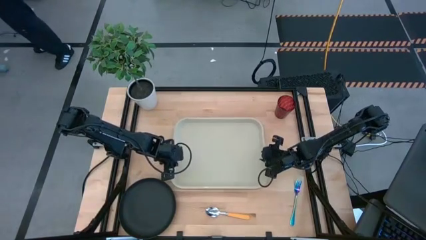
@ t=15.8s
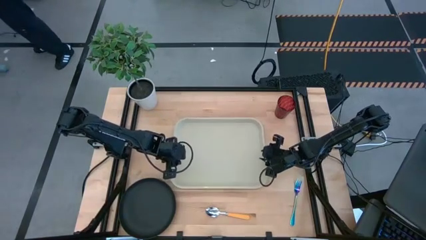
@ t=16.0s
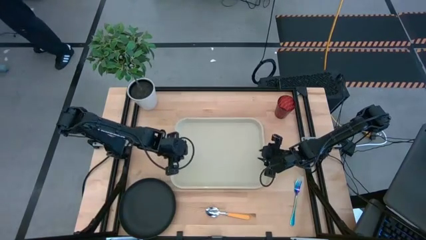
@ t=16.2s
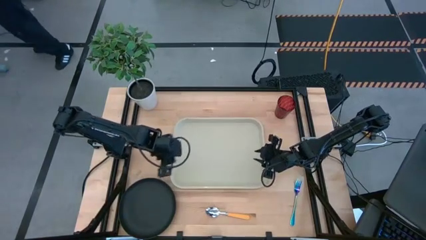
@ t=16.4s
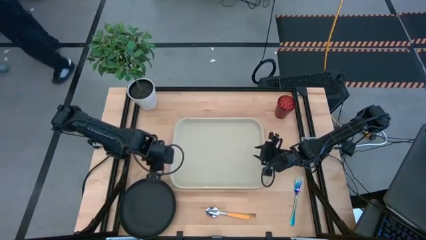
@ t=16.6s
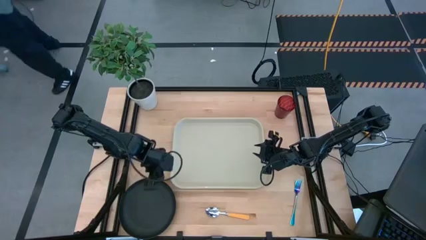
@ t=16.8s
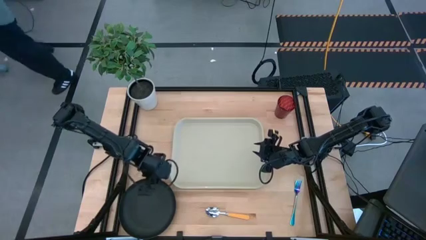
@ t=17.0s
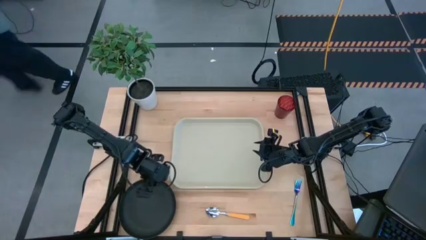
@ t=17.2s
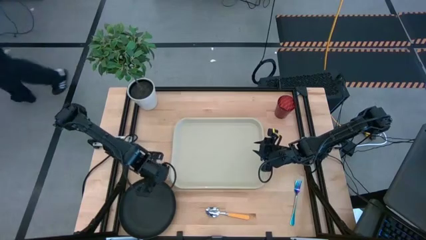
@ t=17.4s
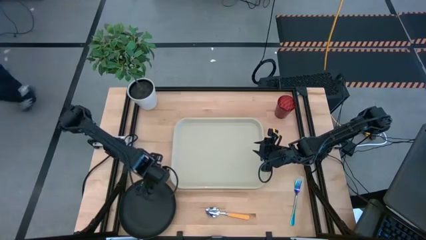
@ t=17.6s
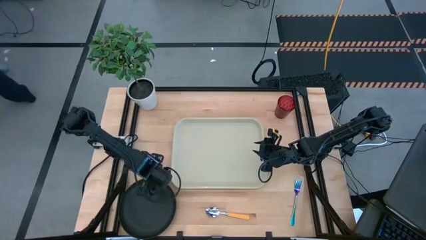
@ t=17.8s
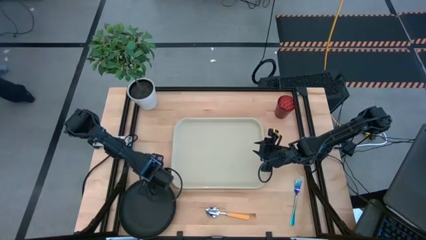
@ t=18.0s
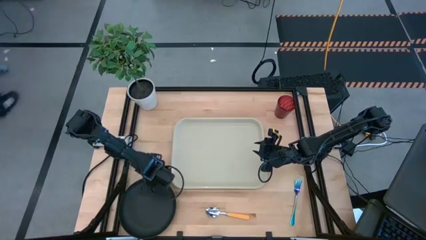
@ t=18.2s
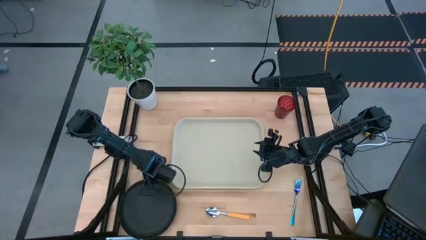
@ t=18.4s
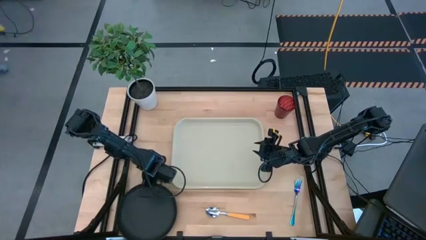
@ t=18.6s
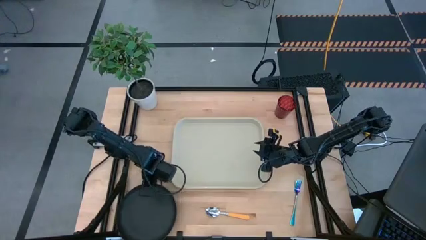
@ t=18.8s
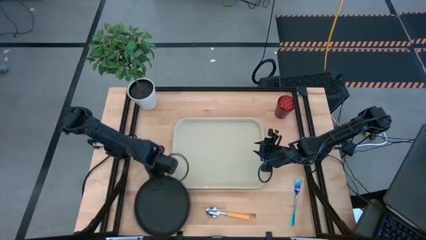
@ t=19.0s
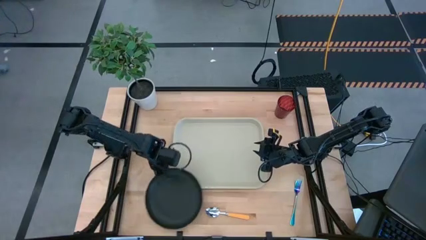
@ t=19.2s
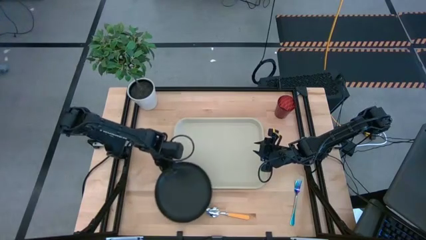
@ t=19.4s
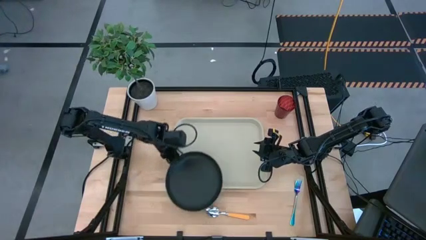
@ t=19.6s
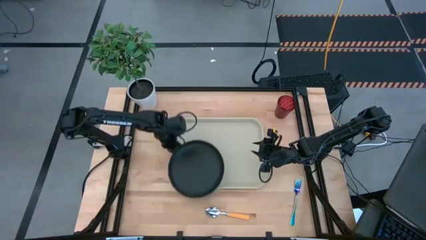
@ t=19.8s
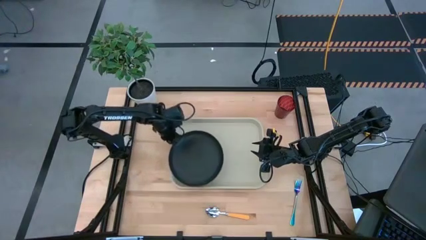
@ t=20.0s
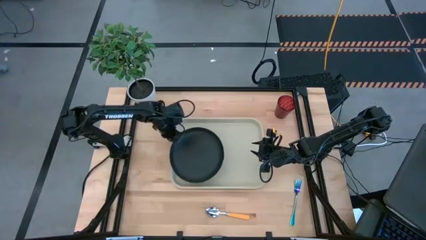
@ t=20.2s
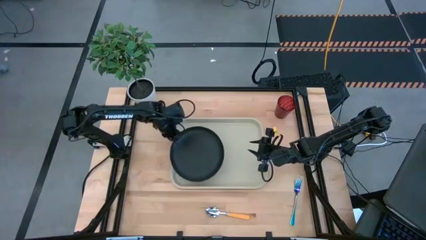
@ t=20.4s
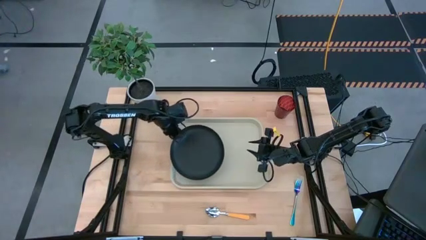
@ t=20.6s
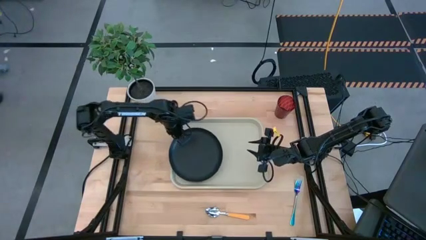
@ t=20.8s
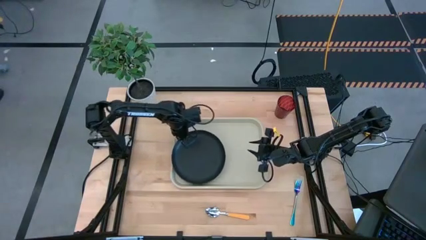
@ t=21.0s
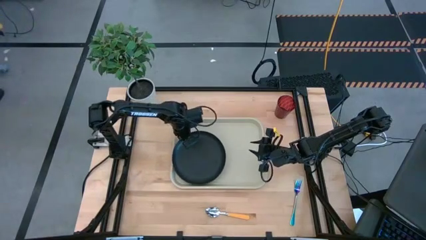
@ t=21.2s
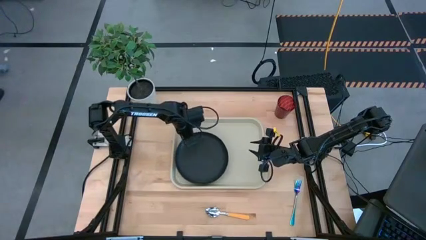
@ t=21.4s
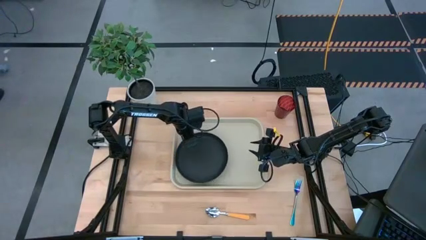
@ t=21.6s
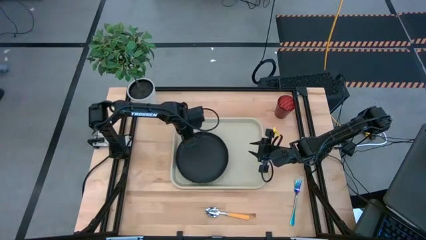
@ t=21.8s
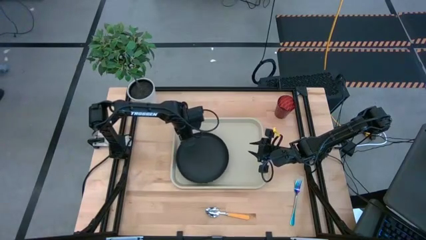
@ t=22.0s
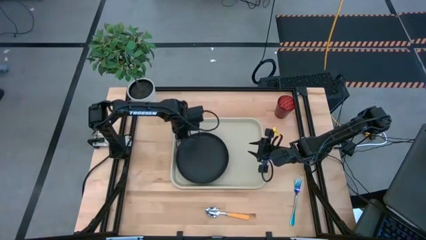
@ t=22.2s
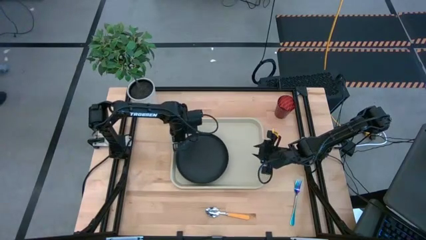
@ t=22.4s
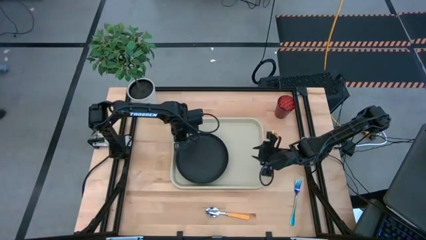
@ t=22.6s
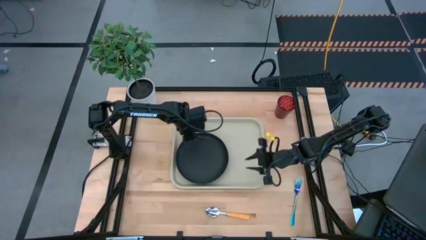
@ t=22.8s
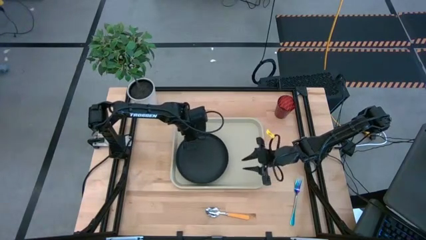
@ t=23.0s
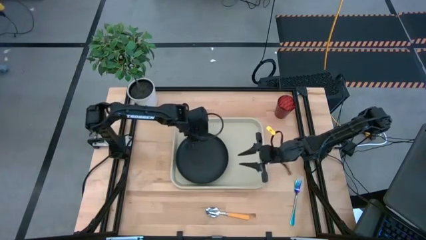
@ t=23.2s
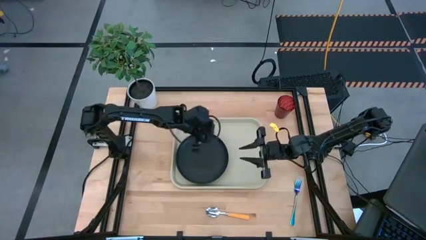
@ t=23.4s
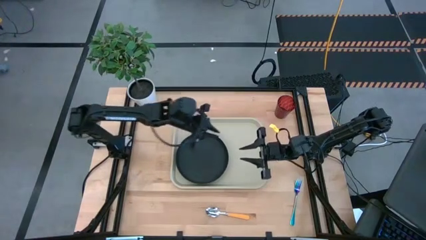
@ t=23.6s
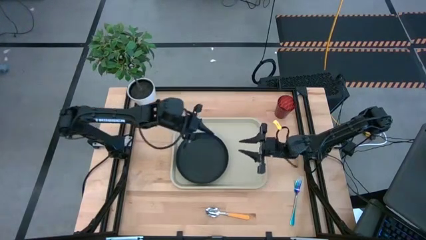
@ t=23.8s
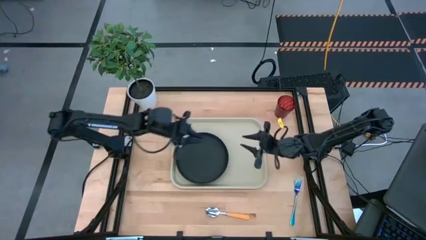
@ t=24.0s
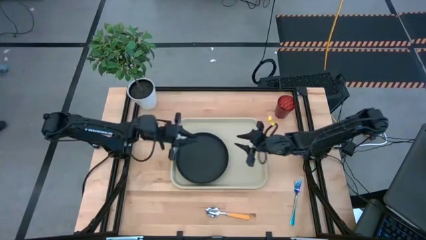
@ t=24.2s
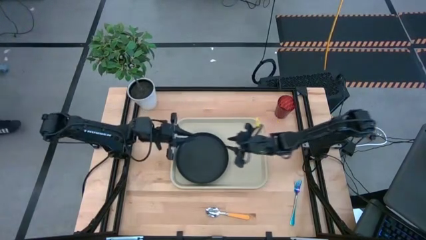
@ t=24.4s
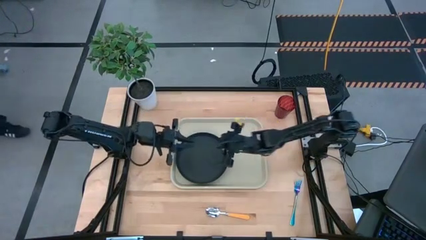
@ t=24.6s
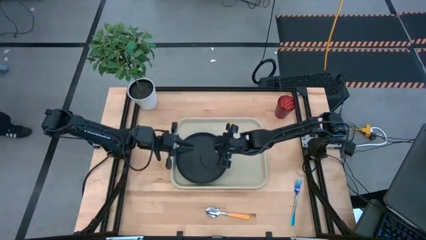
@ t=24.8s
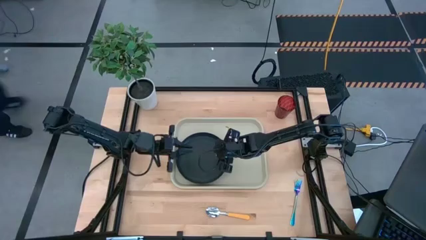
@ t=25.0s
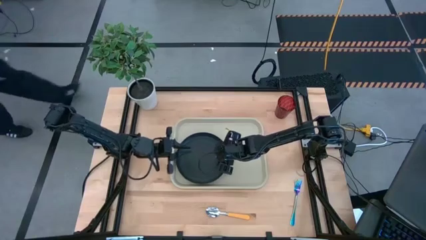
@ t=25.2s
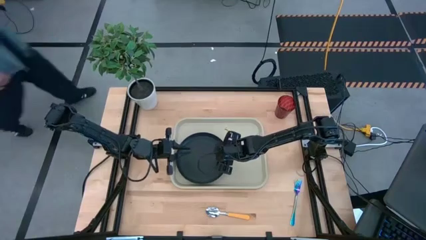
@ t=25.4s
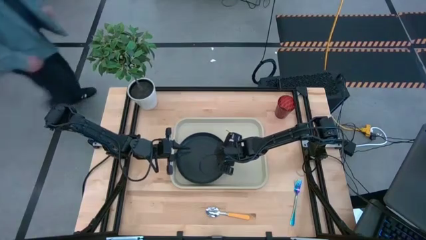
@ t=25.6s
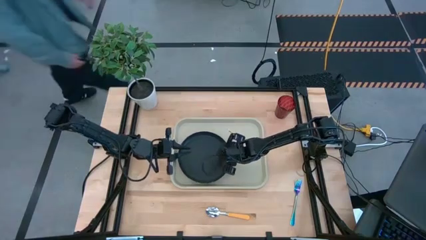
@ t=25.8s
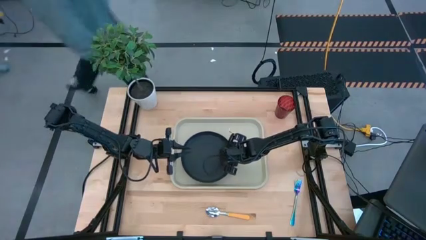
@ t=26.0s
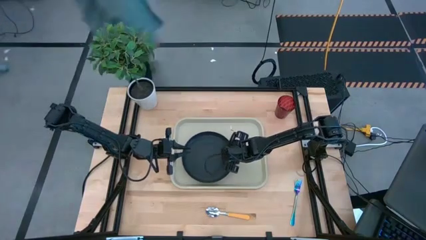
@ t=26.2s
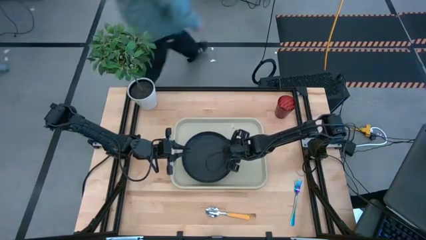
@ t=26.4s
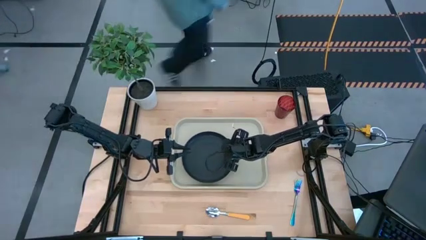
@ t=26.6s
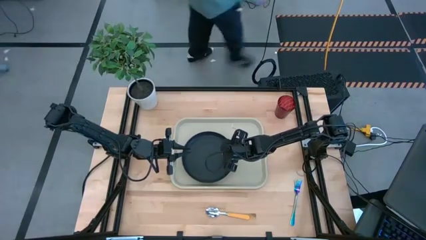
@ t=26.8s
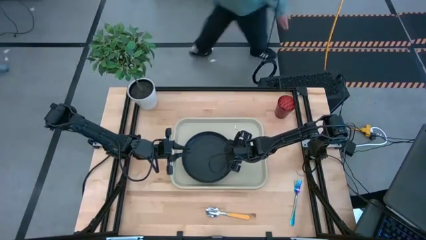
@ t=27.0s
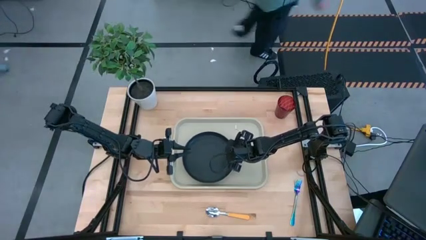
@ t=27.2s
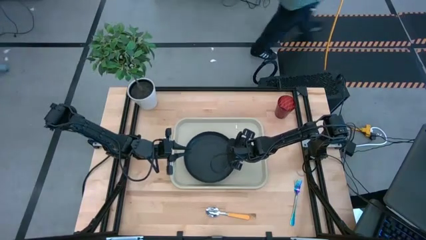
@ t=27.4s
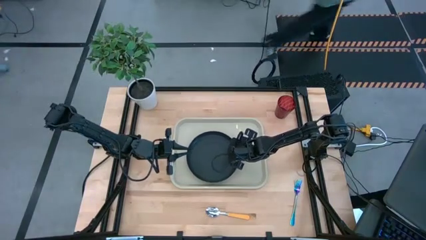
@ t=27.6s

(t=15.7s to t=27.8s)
Task: Pick and place plate/cup/fork/spoon on tray
Put the black plate in the center of the gray tray

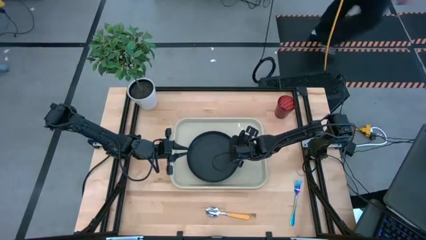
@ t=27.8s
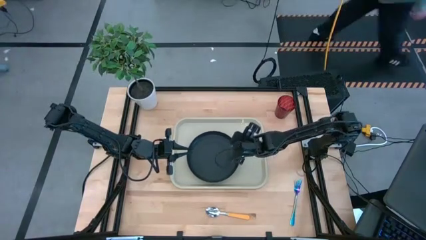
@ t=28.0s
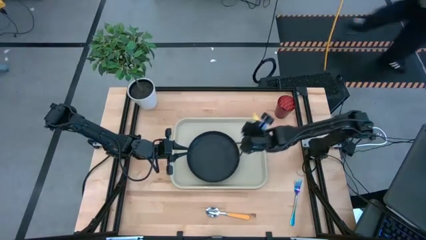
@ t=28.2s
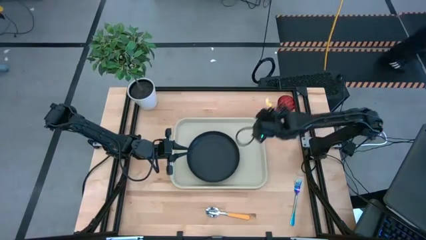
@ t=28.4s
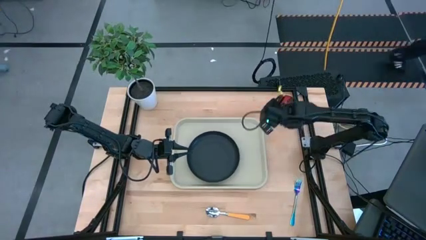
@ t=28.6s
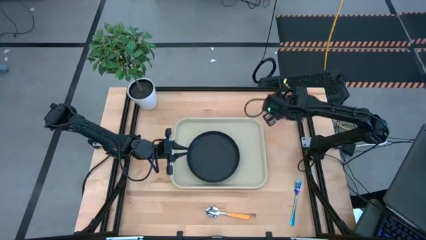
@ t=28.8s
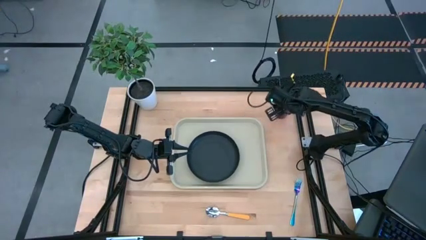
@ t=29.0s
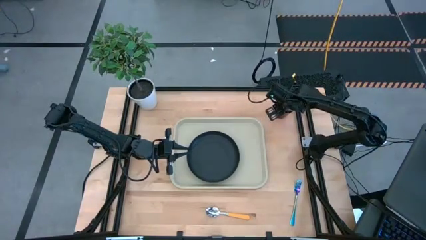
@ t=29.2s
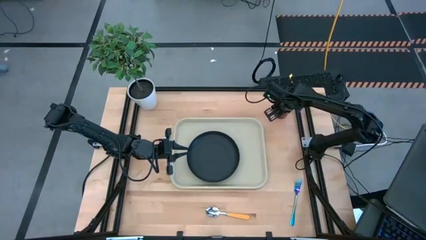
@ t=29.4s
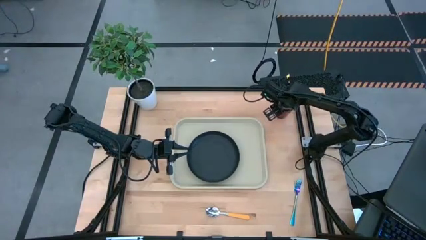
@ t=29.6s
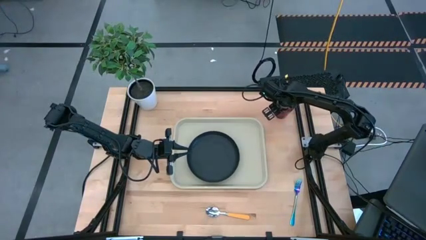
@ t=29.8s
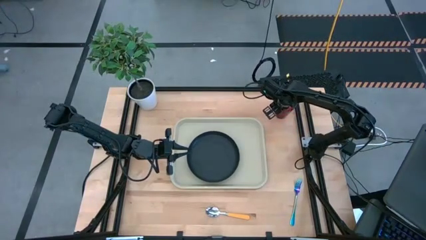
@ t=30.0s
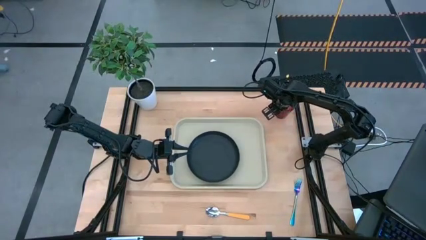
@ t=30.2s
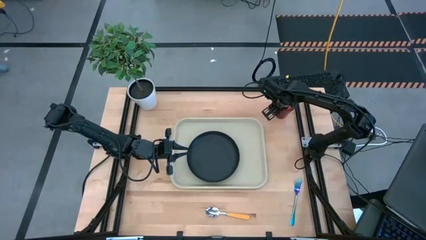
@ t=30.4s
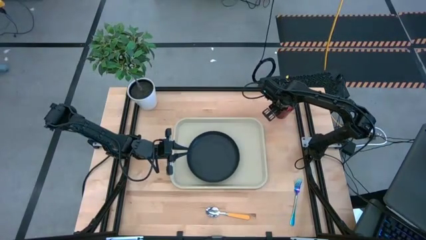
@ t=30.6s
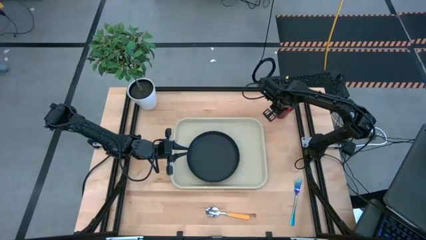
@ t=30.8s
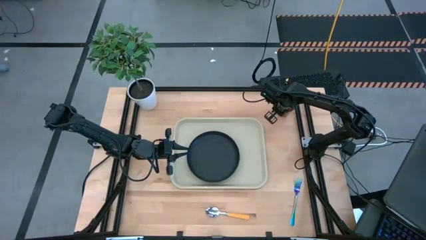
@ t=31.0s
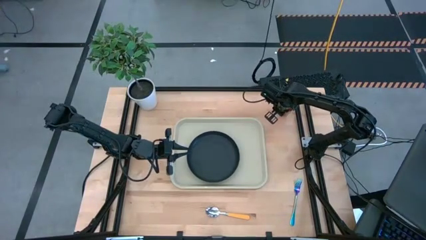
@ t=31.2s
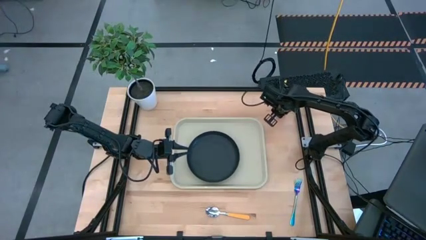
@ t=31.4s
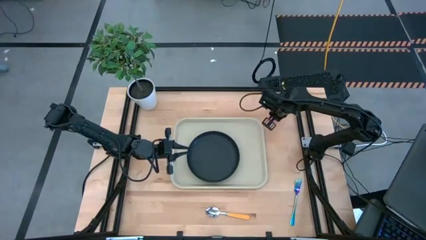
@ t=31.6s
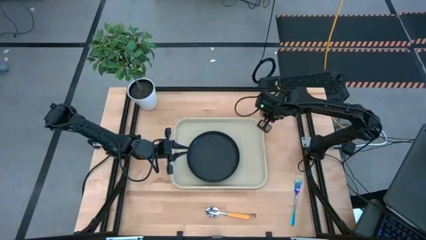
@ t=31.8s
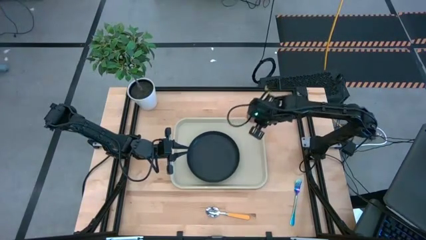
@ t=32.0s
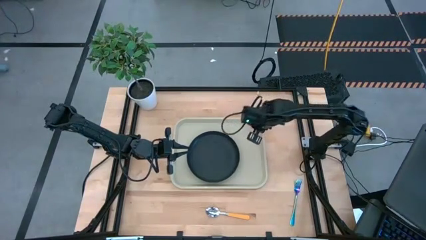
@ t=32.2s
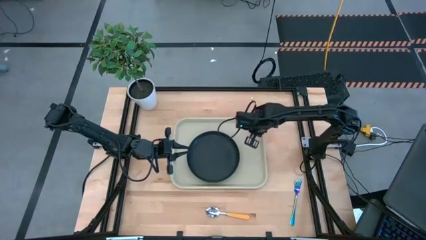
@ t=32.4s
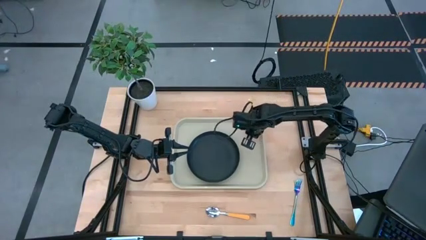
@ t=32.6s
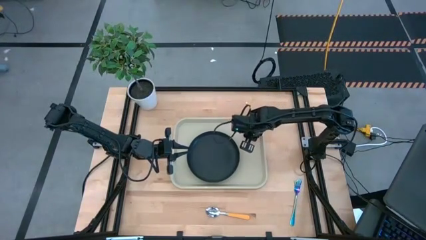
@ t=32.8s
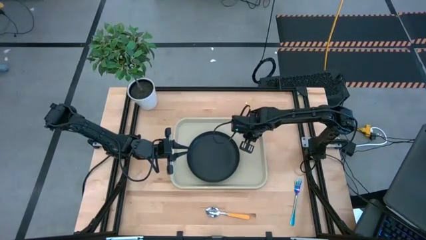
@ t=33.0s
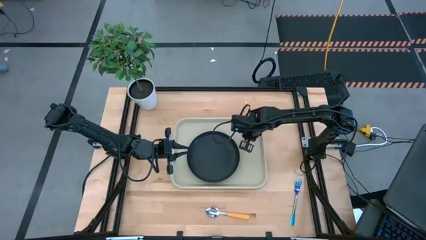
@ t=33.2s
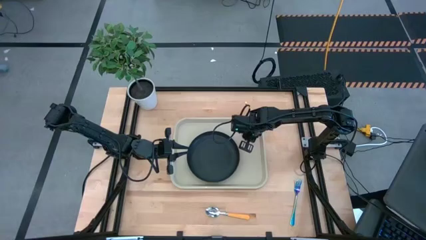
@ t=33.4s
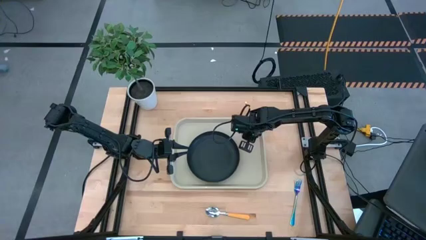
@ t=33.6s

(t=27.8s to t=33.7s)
Put the red cup on the gray tray to the top right of the black plate
